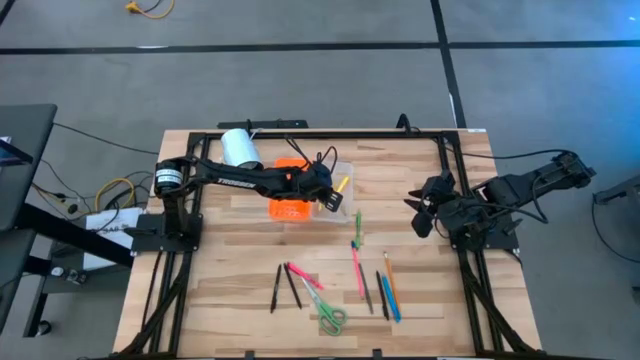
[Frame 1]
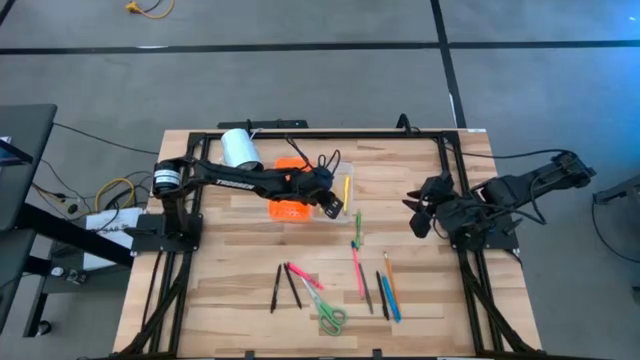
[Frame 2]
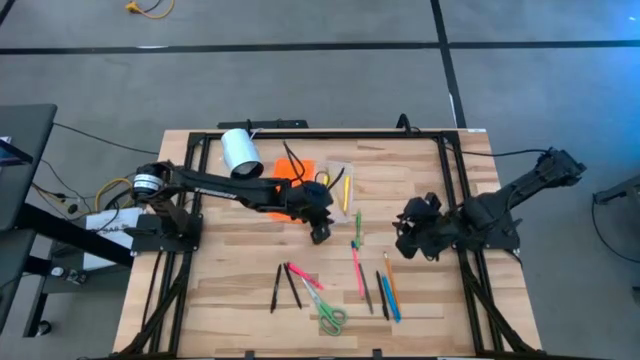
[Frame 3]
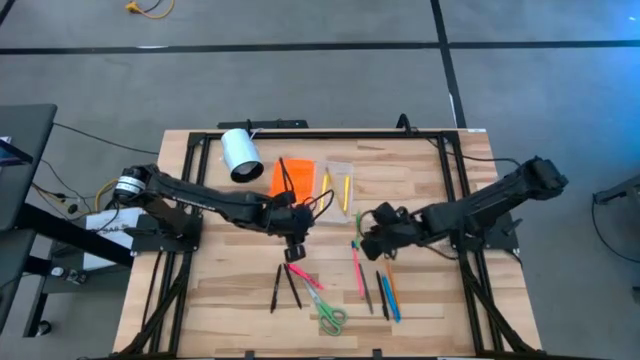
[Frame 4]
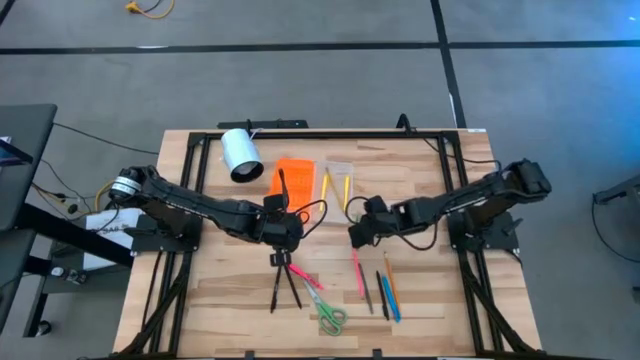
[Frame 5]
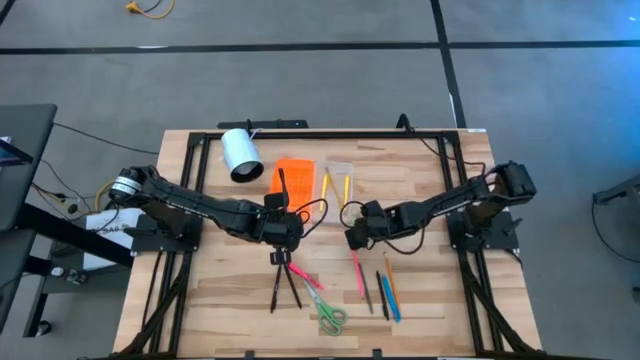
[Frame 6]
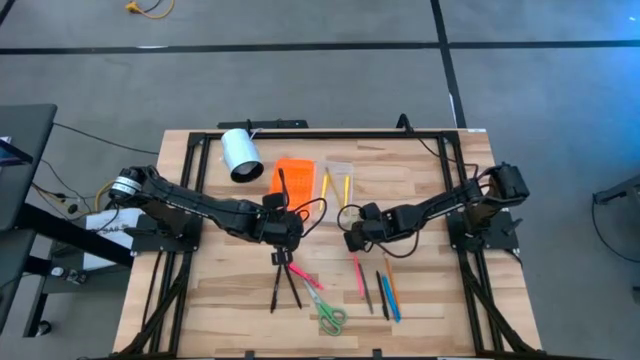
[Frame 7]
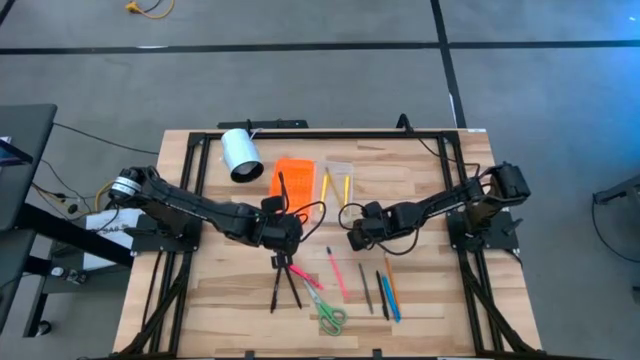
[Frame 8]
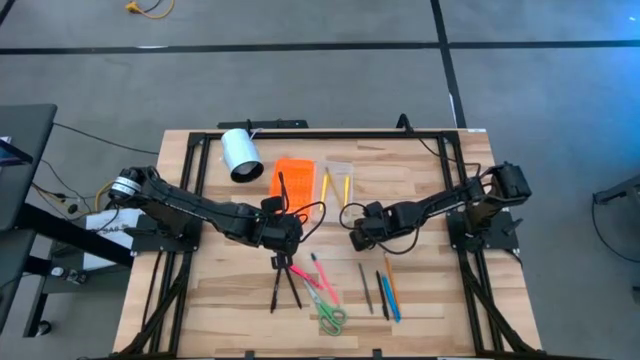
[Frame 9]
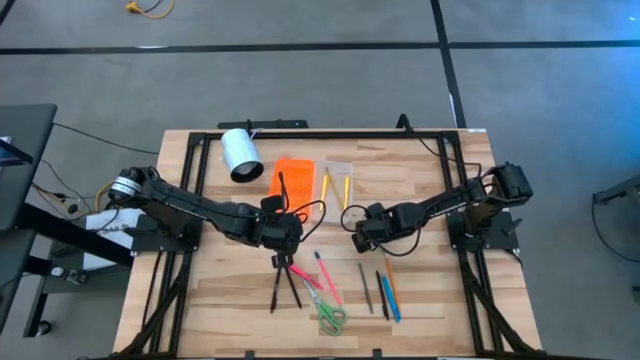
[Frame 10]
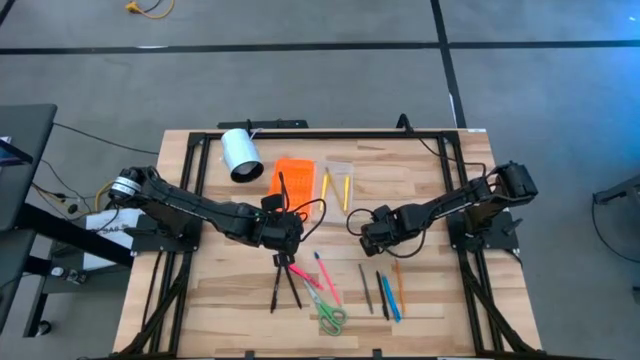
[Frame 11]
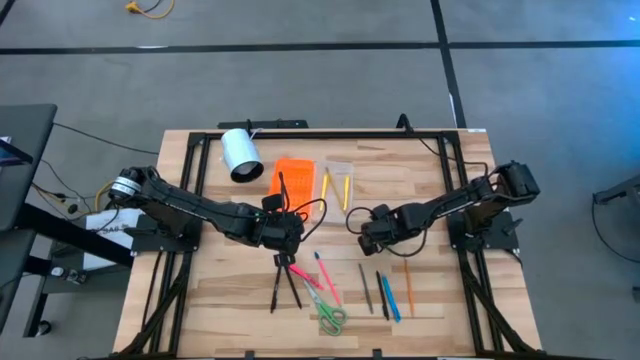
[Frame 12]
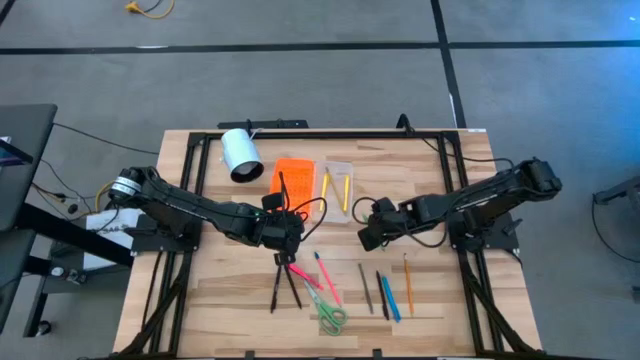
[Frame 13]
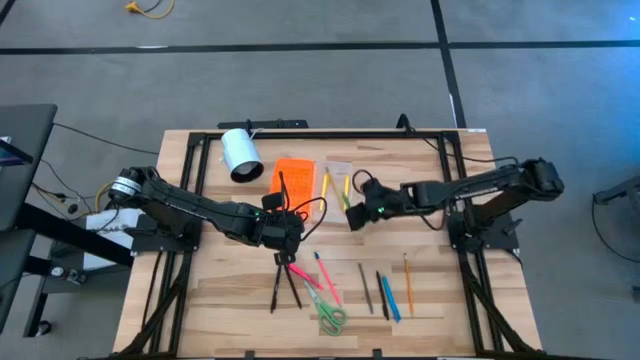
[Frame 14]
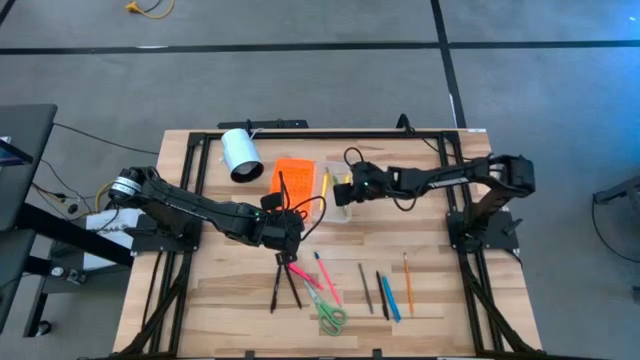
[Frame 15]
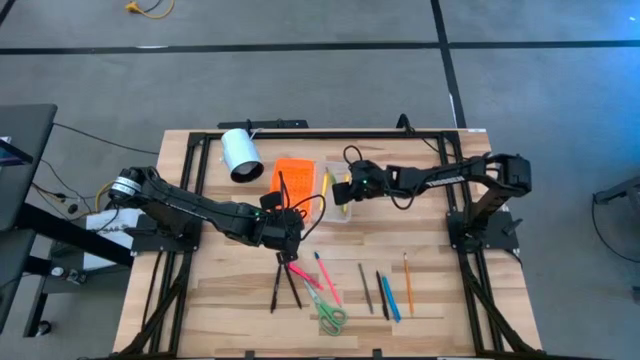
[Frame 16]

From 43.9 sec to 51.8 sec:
Task: Pick & place school supplies into a supply box
Put the green pen into the orange supply box

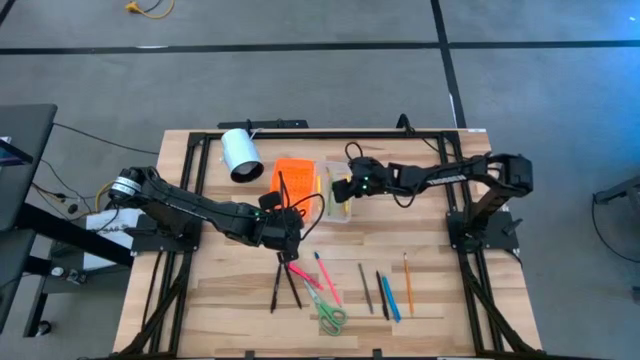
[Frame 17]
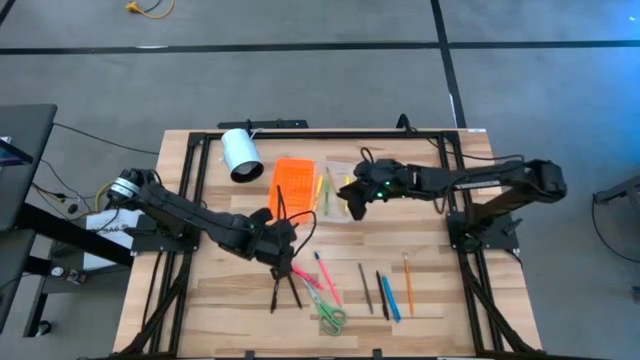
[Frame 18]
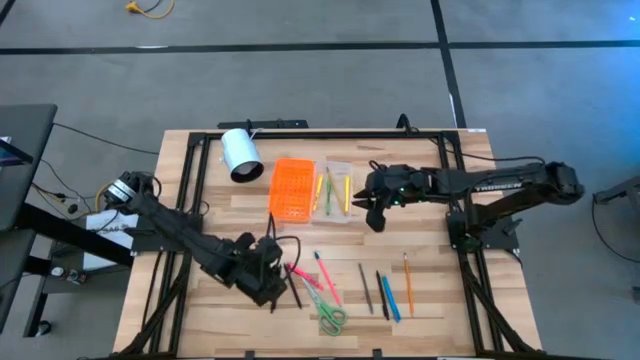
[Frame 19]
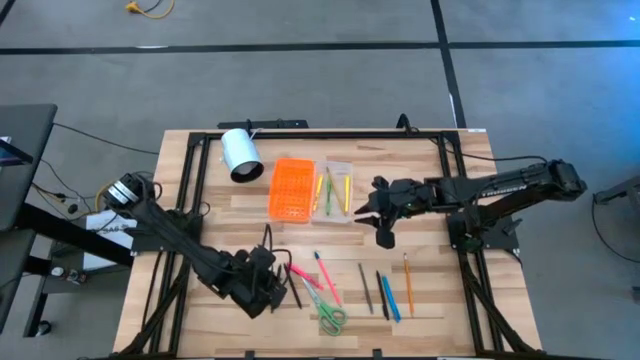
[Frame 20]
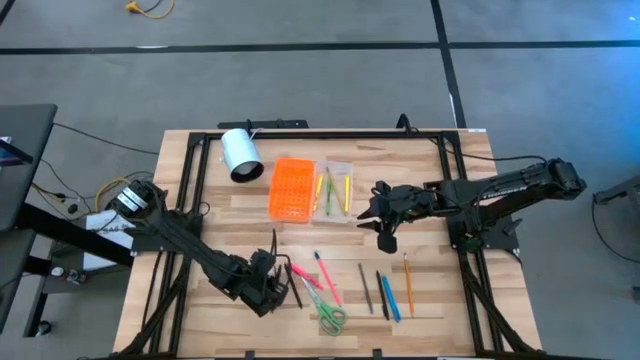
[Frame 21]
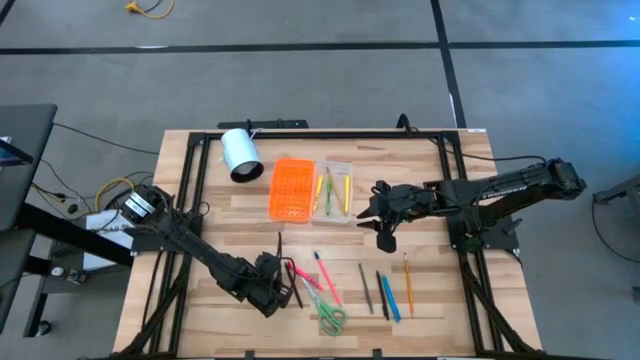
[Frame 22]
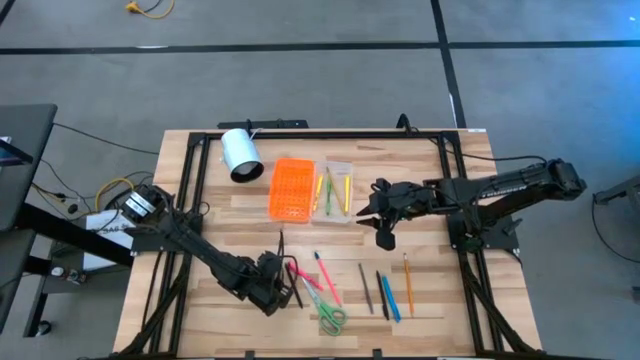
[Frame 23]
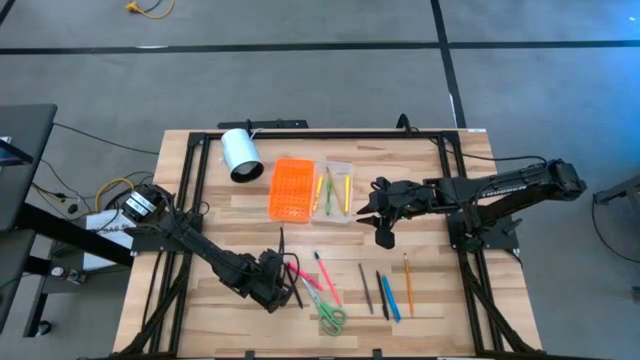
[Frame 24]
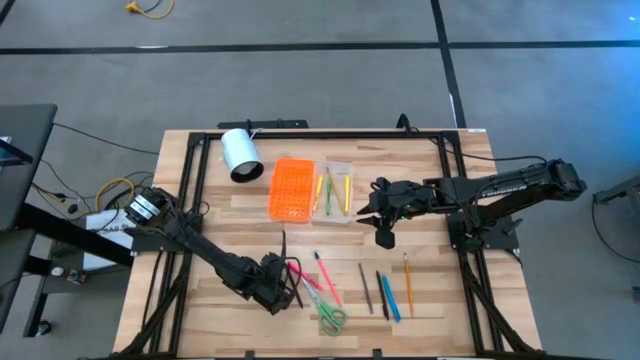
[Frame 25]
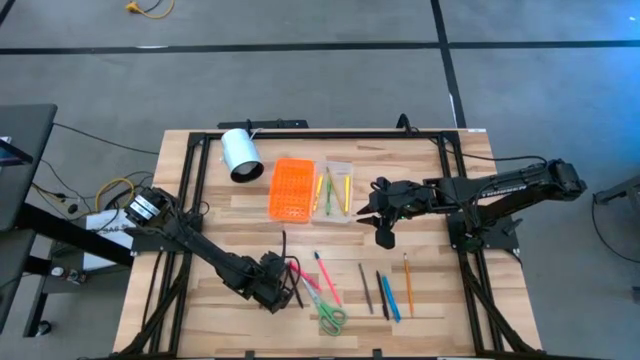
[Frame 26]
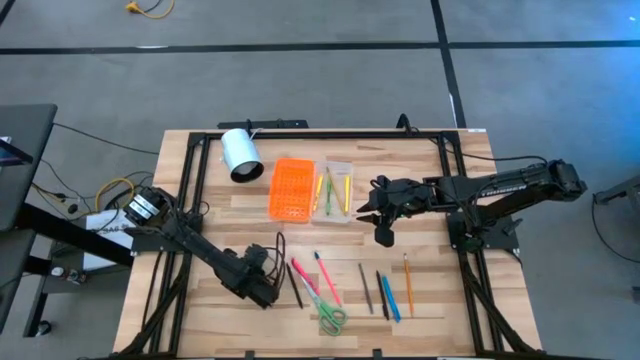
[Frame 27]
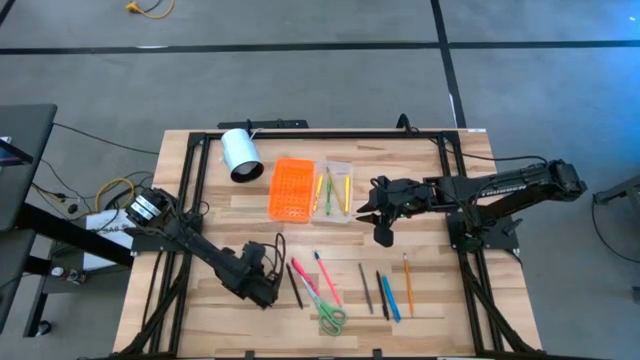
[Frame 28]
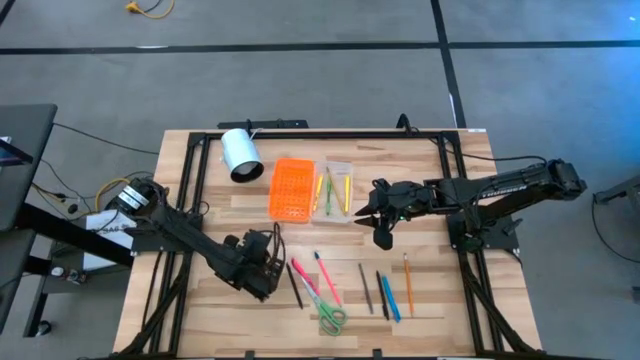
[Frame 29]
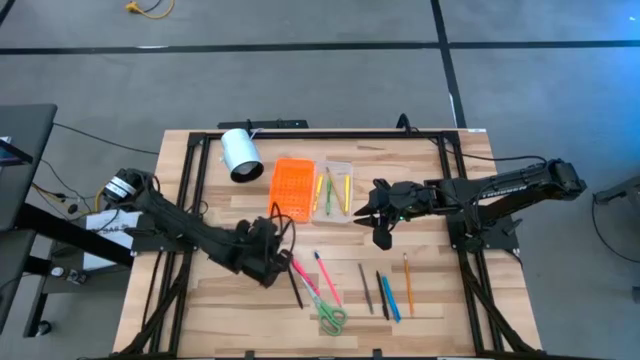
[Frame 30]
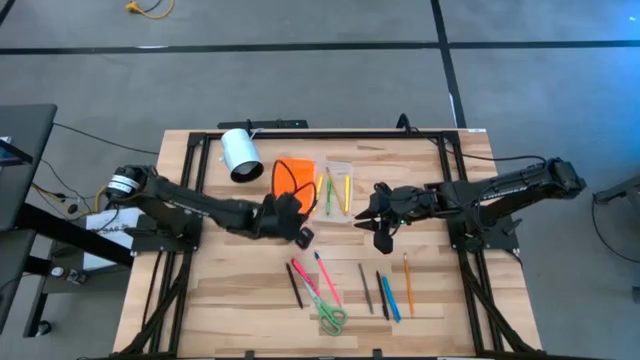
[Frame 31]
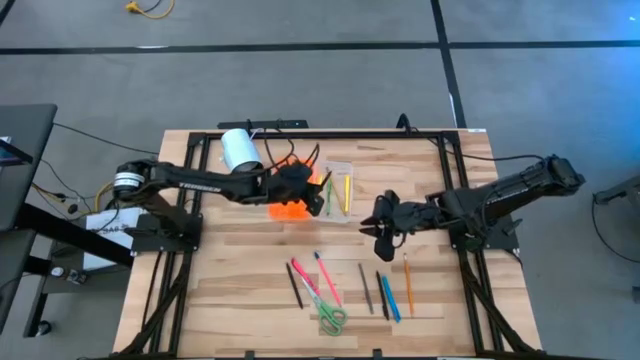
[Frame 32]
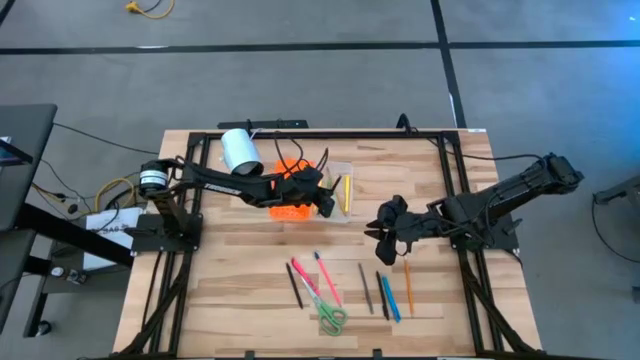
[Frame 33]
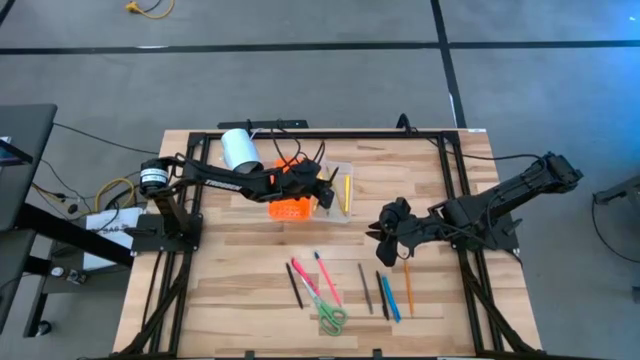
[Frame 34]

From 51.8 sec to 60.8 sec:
Put the left black pen into the orange supply box

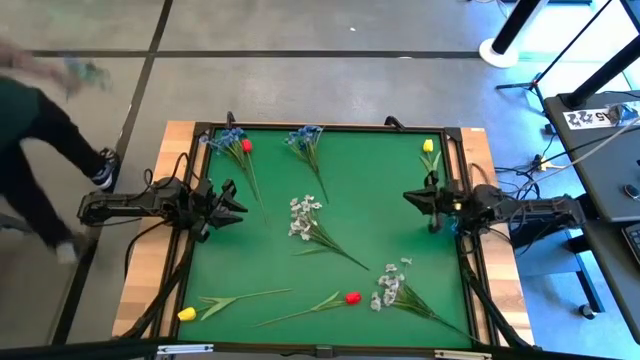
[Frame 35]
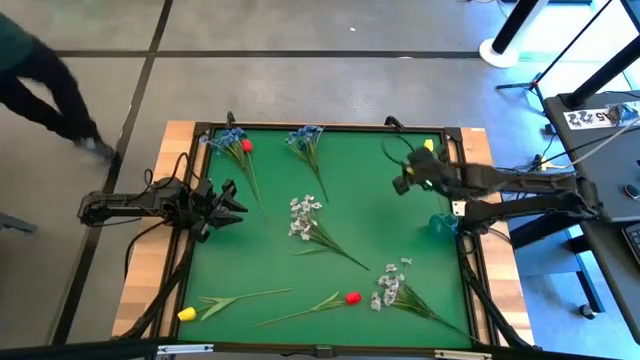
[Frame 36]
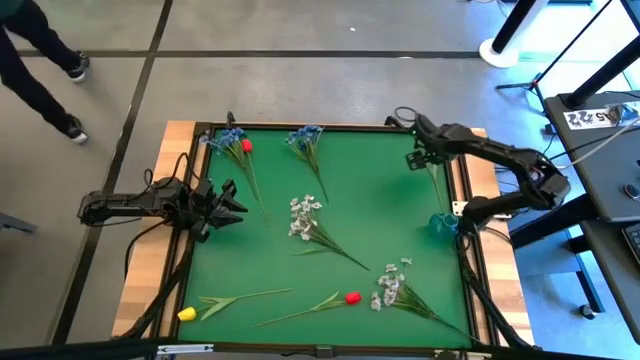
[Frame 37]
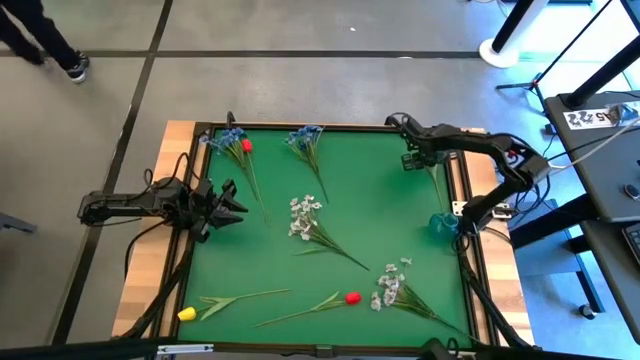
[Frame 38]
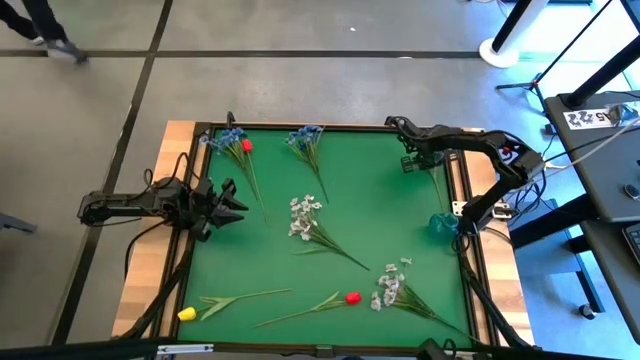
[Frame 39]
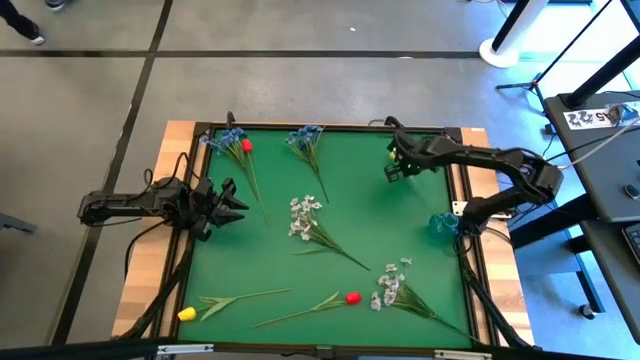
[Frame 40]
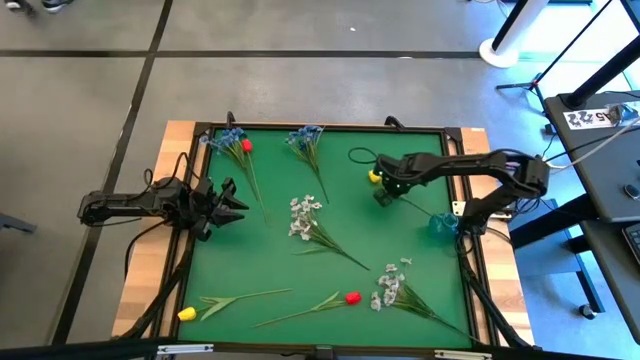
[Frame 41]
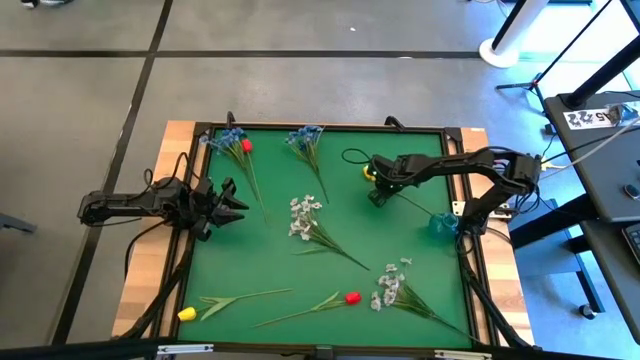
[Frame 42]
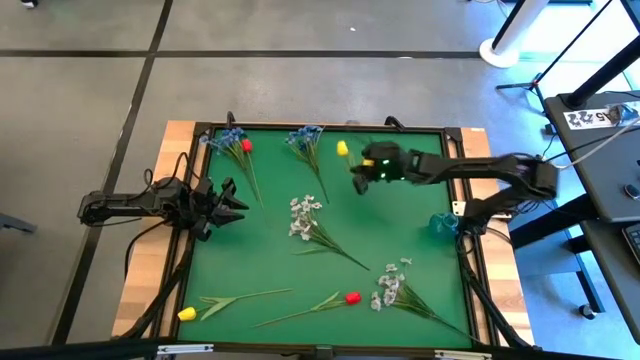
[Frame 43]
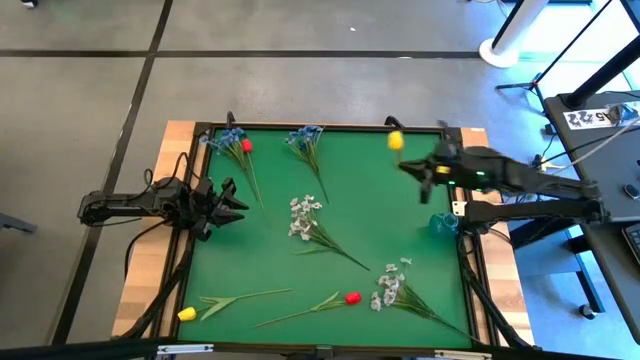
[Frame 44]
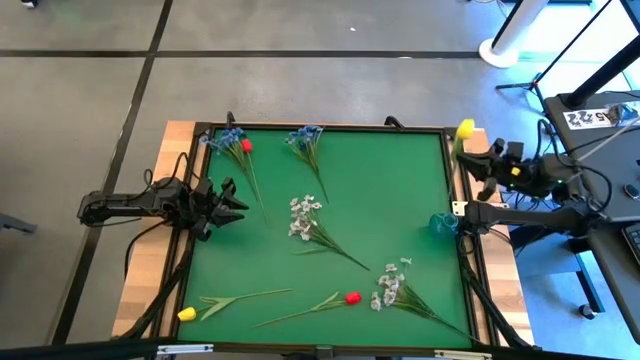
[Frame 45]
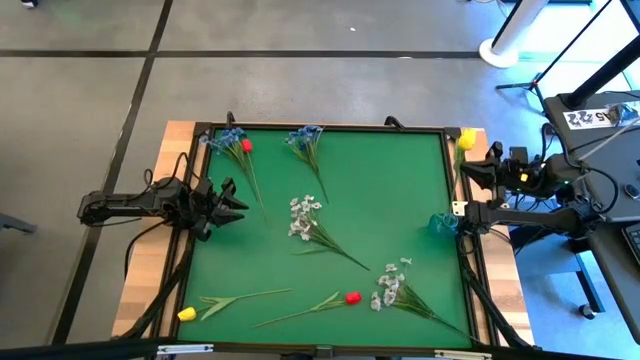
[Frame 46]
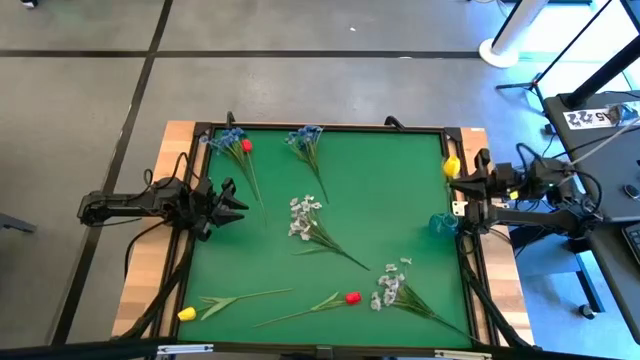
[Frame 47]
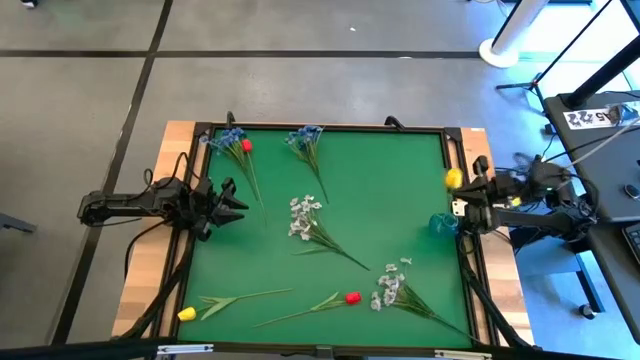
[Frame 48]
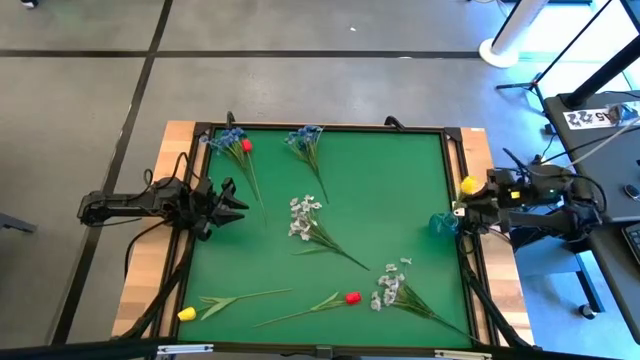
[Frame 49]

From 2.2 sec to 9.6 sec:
Task: Sort flowers into vase by color
Put the top yellow flower into the blue vase
